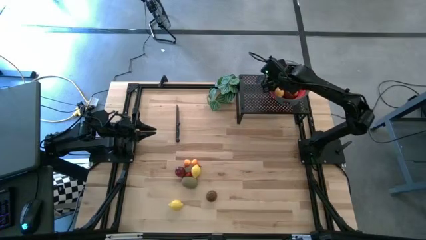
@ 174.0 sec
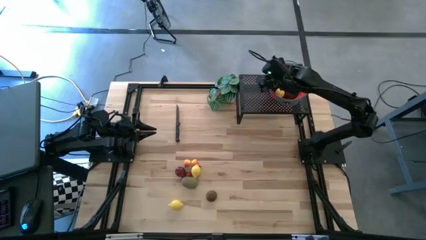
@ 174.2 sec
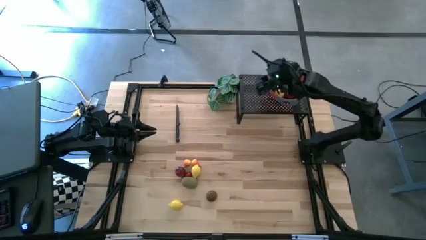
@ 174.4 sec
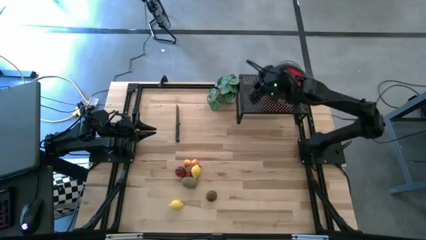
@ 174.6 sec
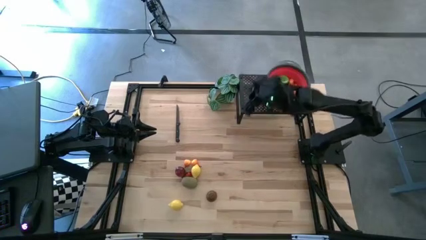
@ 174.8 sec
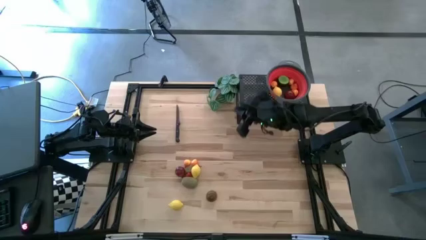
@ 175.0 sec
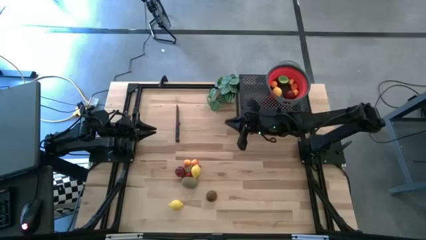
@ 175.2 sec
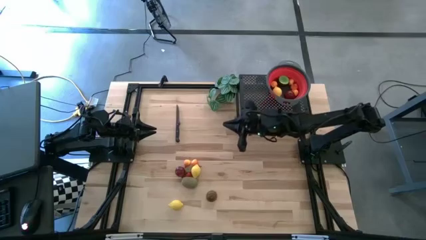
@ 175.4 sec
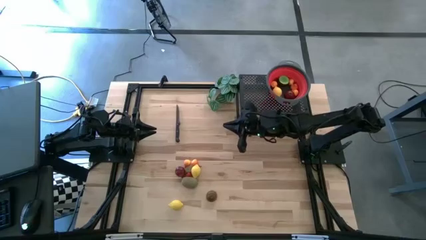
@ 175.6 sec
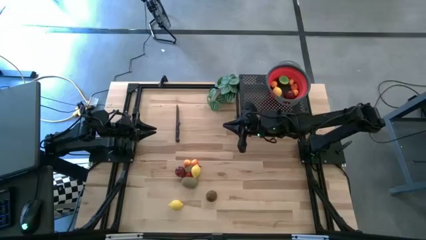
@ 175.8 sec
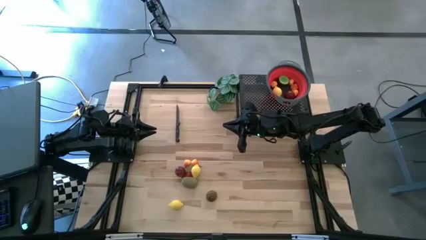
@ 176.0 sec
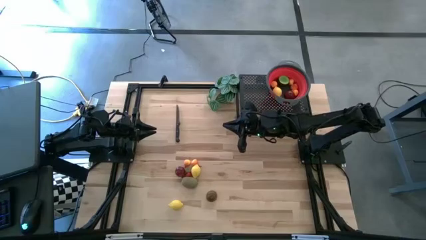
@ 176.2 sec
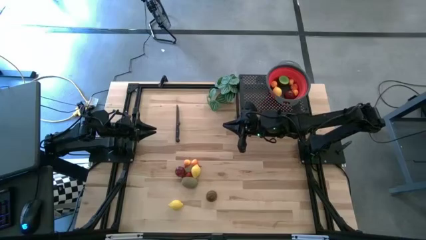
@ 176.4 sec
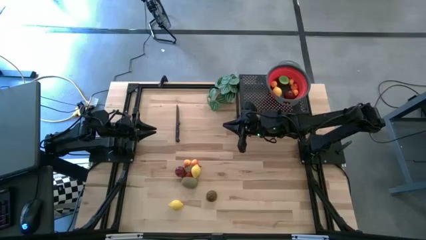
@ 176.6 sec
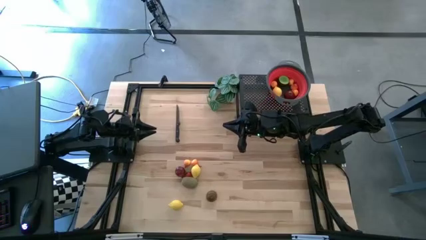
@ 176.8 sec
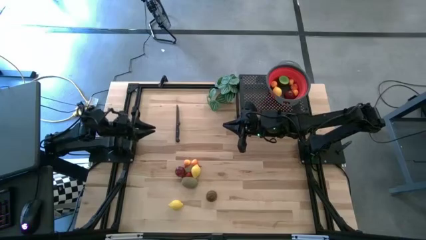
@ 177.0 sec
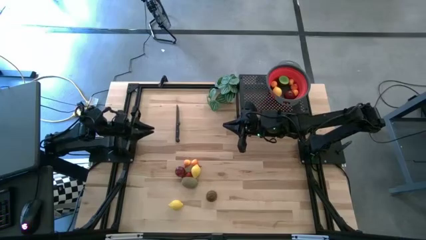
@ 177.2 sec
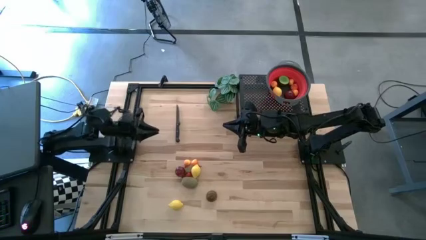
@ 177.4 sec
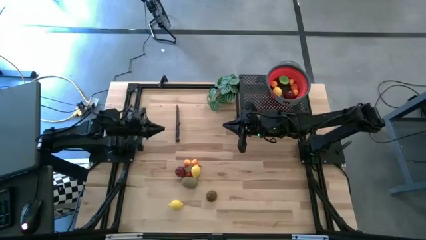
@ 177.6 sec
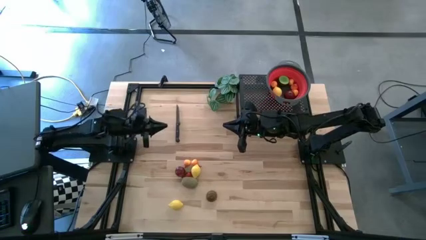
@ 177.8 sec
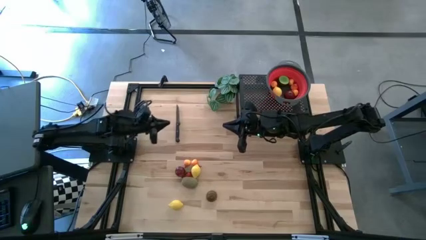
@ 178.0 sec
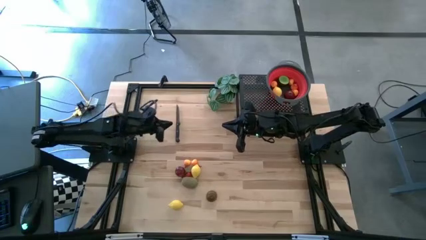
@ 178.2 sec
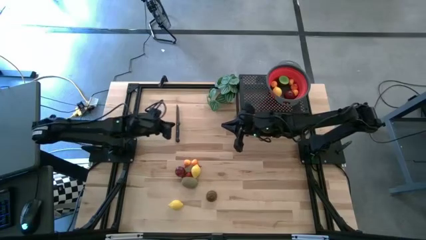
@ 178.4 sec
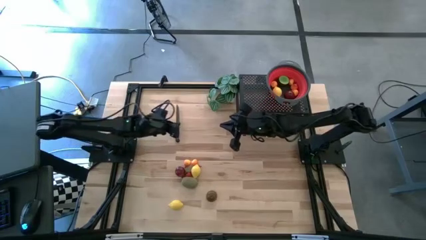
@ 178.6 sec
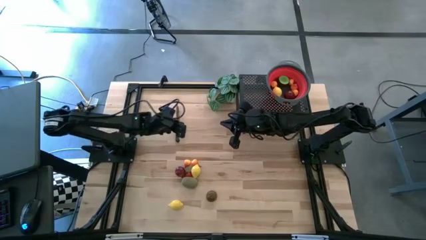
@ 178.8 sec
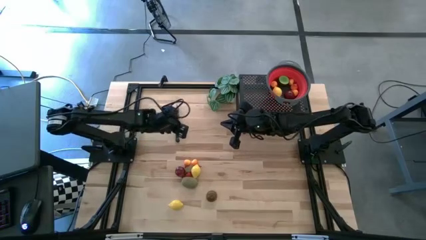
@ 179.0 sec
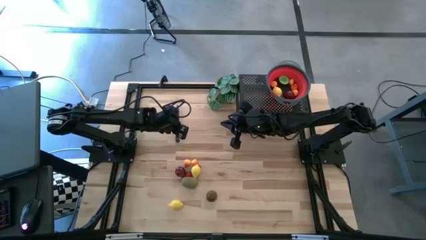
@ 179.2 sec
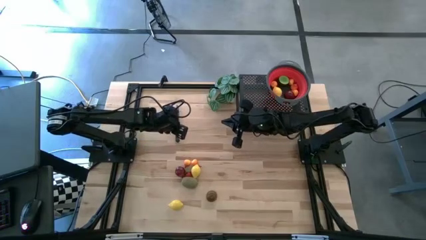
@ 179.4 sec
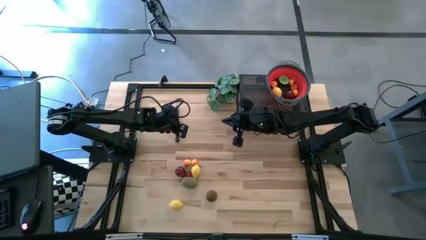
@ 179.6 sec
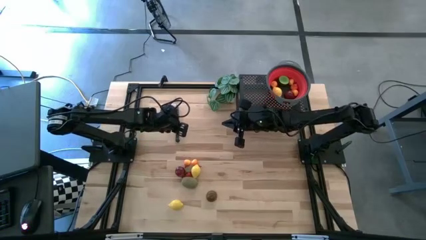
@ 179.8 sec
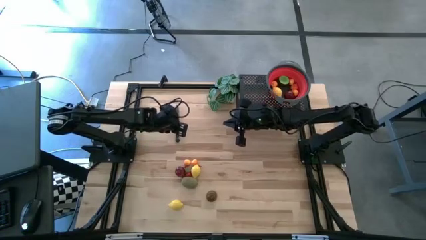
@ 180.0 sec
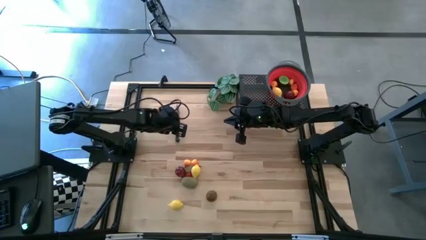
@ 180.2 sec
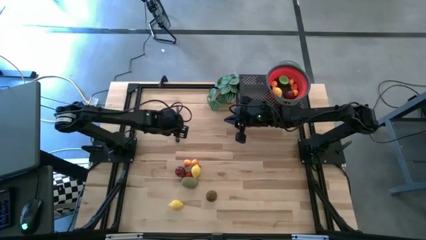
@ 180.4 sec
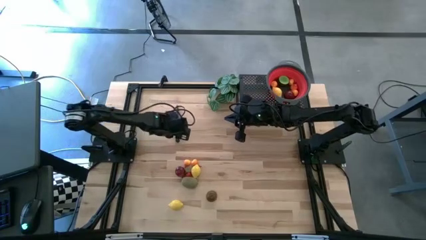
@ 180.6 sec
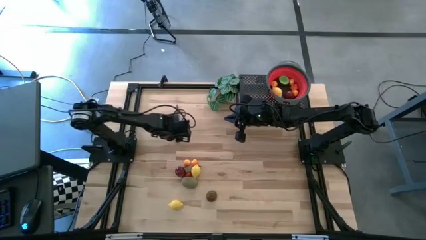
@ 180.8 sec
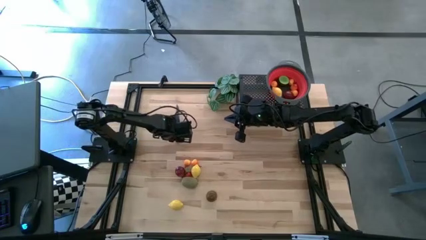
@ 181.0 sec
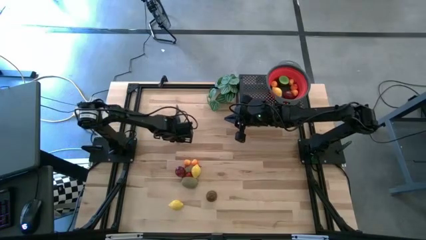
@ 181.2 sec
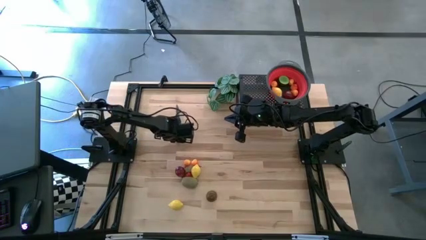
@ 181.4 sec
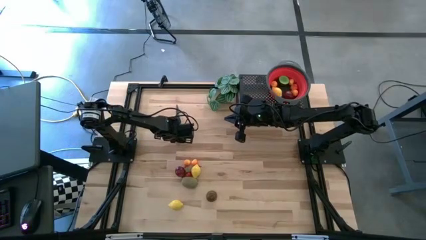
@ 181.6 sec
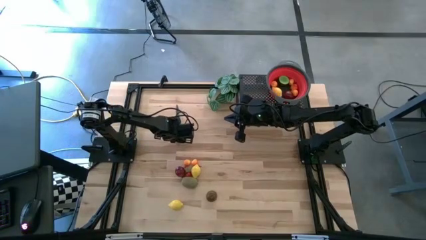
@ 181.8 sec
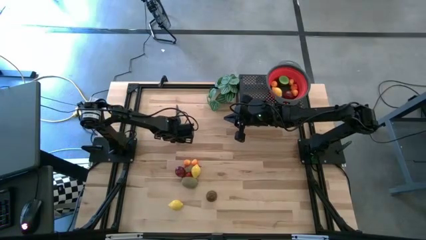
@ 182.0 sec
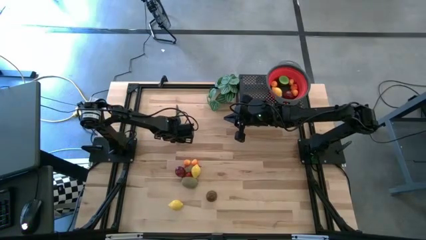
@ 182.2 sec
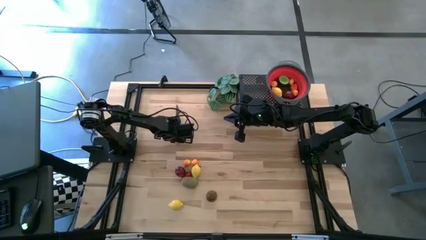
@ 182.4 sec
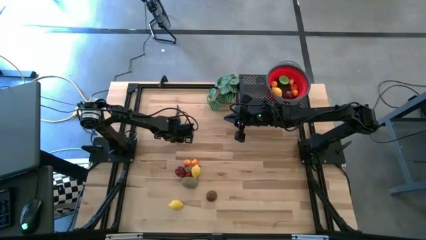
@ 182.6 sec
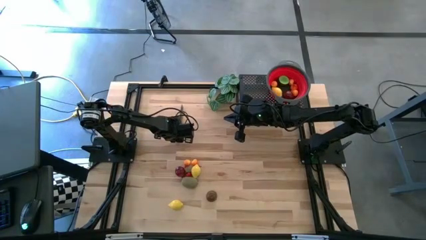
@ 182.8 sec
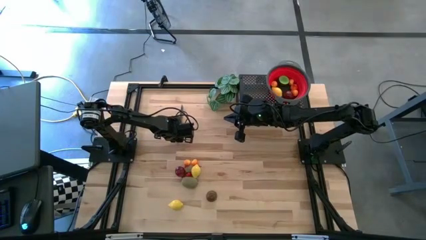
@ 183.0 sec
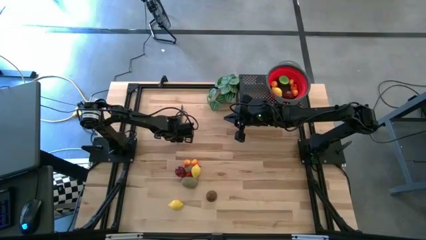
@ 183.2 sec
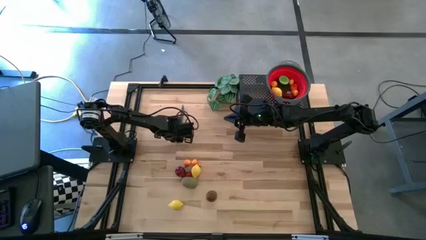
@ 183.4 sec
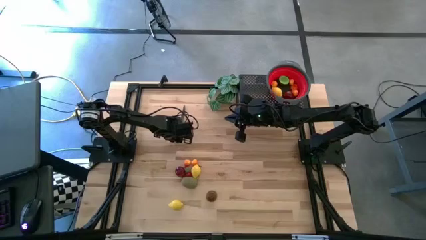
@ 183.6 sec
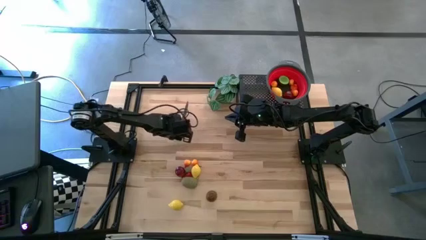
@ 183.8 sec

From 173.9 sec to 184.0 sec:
Task: Pick & Place Fruit
Put the black knife on the shelf

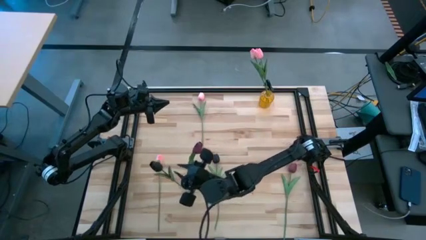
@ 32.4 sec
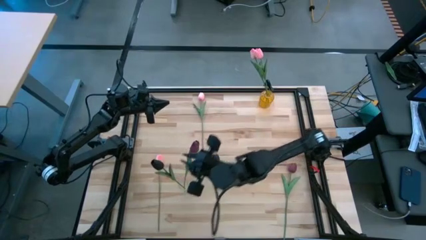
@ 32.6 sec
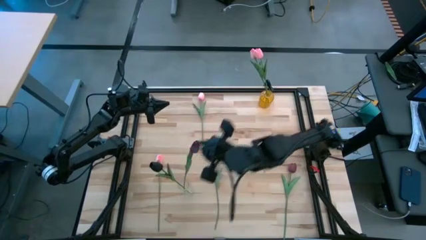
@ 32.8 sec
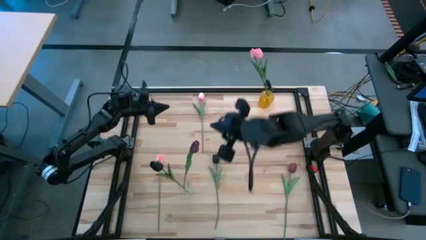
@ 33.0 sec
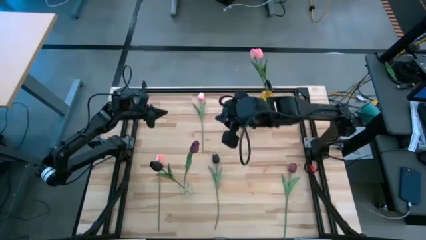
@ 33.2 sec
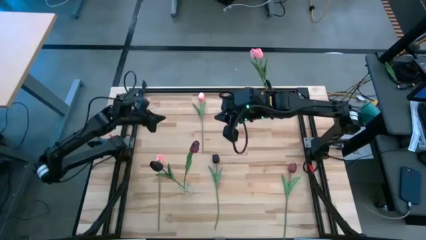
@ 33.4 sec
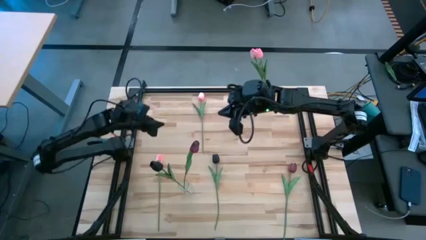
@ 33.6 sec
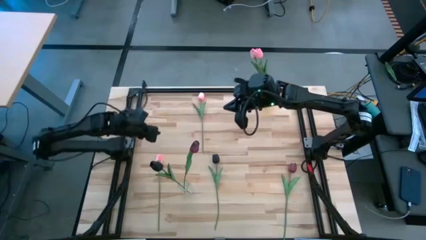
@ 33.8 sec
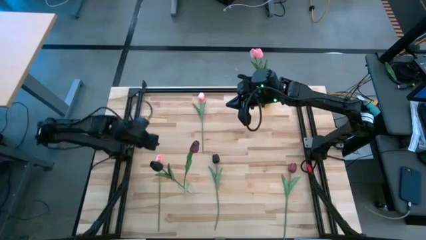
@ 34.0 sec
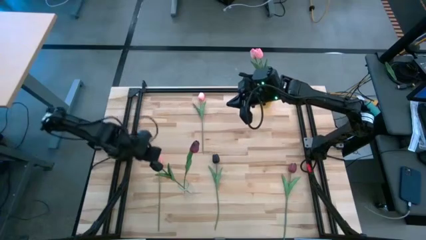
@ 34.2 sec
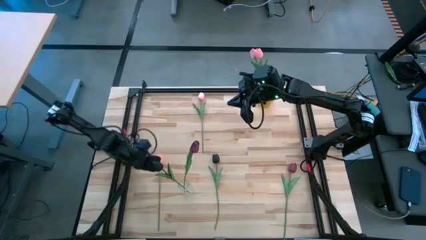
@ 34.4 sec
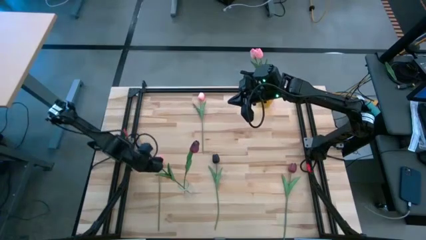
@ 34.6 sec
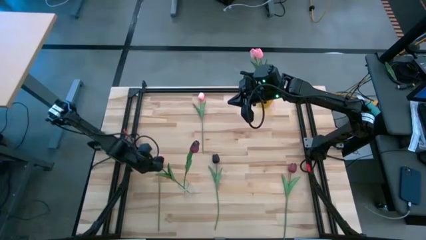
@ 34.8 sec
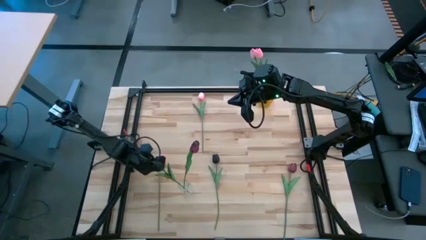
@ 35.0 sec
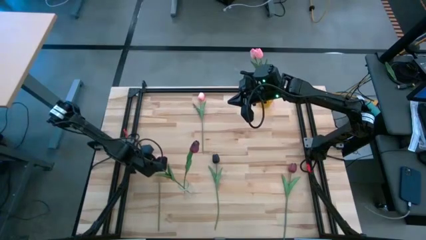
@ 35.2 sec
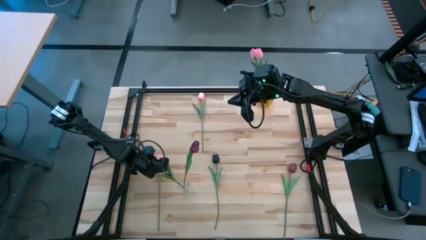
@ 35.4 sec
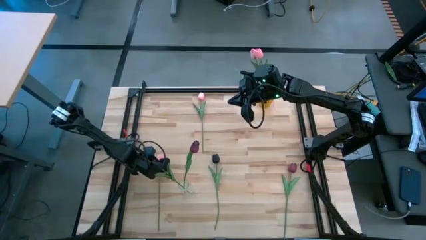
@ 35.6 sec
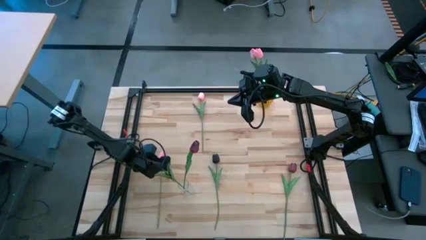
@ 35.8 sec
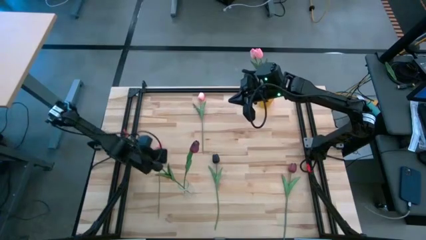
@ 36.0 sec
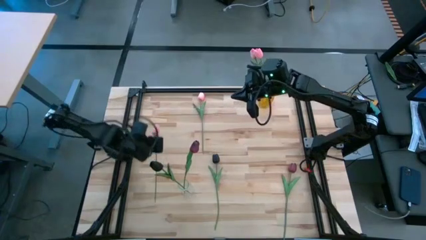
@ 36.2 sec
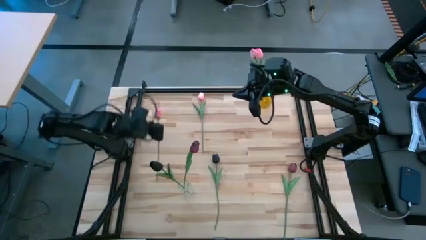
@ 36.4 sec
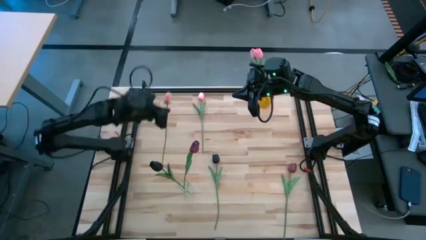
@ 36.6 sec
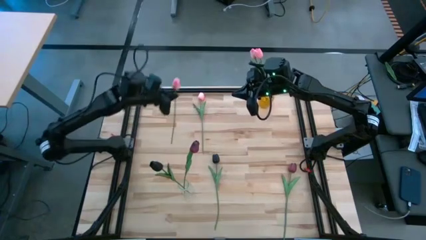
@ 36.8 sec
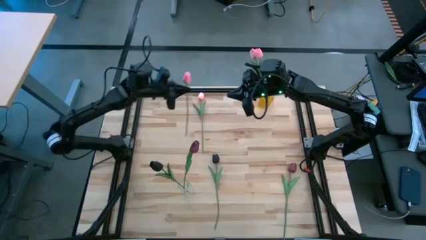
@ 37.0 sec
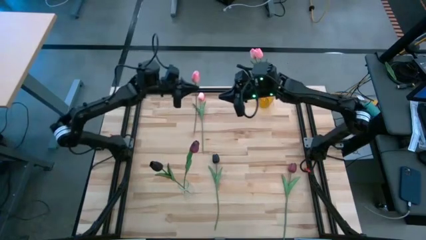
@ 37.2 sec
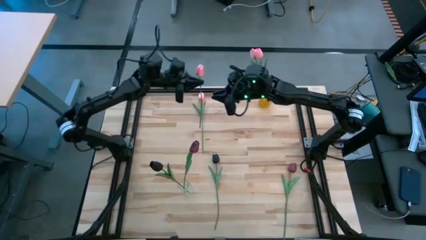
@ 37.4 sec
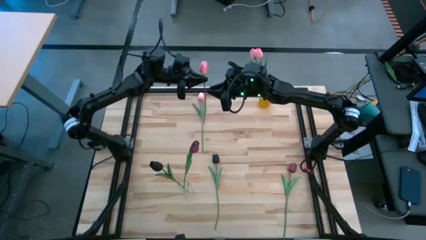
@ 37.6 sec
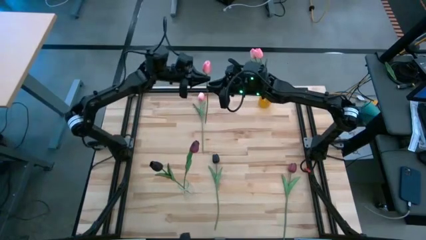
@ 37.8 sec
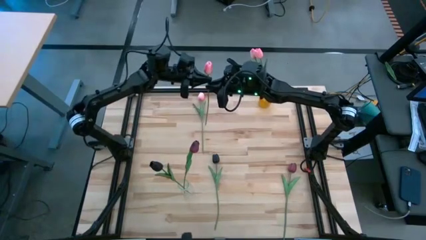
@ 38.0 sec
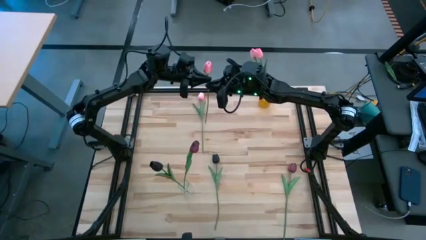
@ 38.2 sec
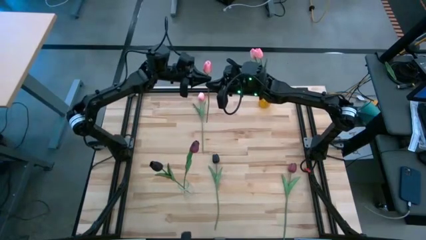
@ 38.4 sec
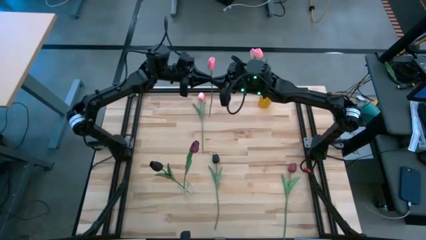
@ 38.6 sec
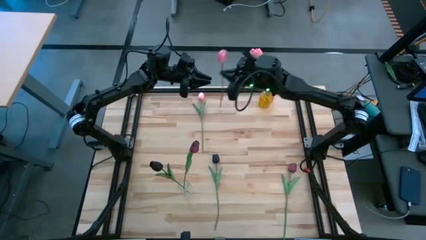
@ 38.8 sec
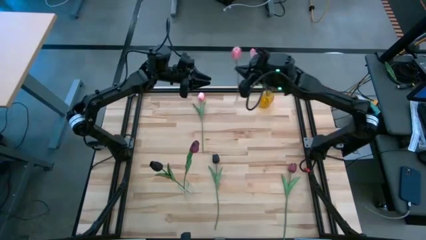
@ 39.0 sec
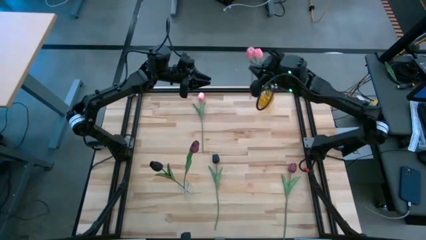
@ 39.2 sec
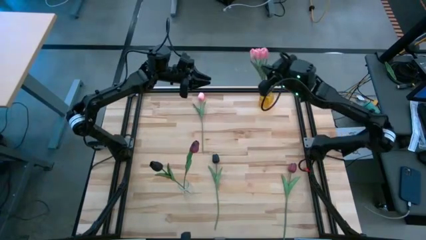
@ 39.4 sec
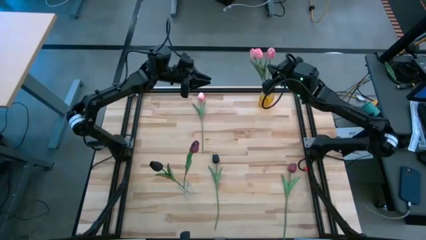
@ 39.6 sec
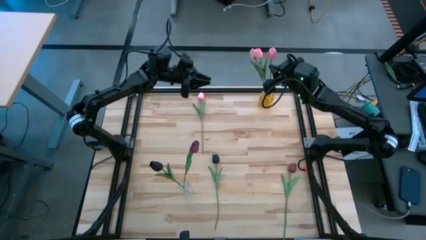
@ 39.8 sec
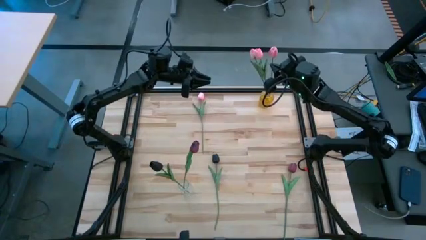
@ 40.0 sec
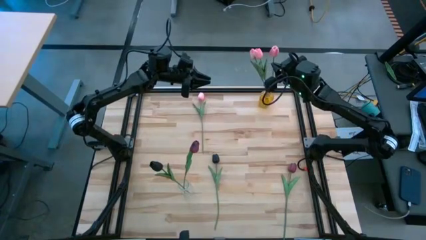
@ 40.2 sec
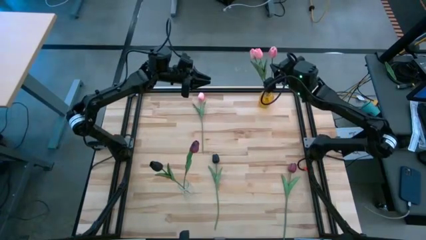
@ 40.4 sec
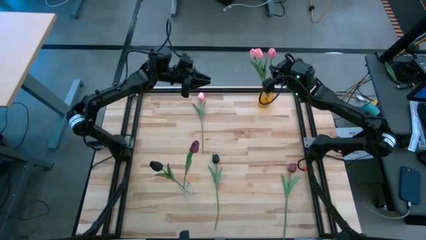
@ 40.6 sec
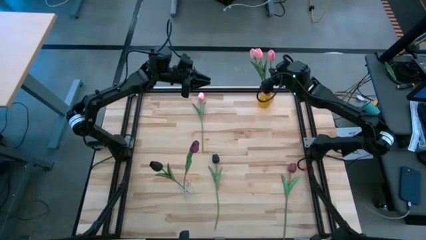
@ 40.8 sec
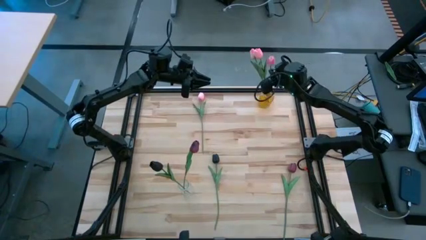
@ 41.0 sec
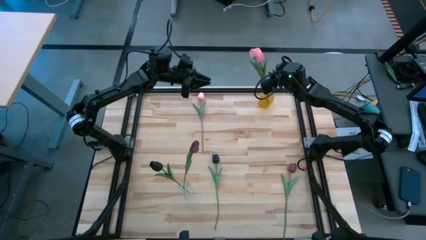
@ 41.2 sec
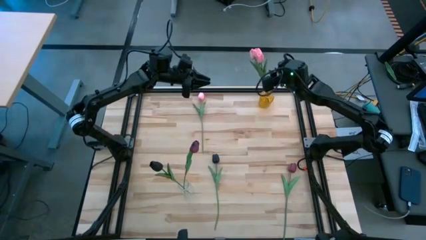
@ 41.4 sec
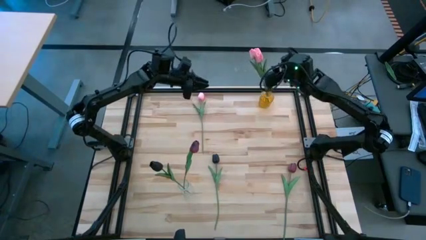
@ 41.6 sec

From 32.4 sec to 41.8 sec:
Task: Sort flowers into vase by color
Put the bottom pink flower into the yellow crystal vase
